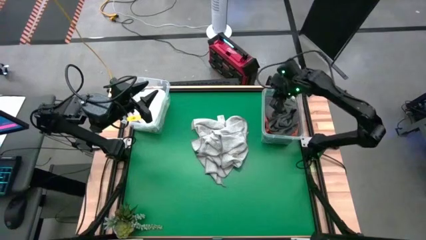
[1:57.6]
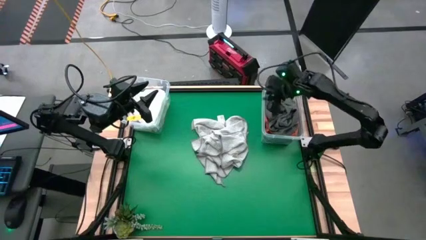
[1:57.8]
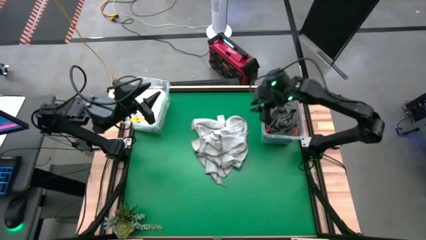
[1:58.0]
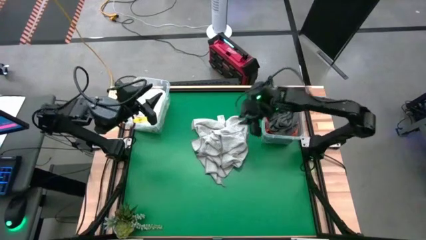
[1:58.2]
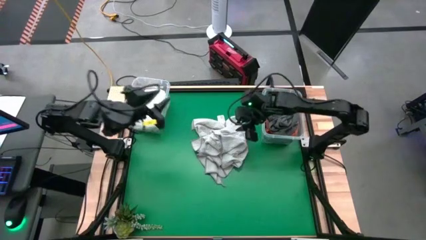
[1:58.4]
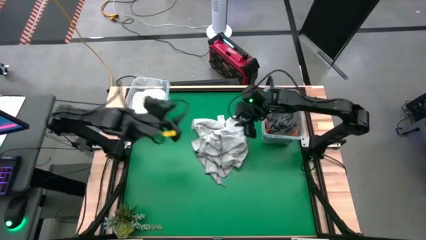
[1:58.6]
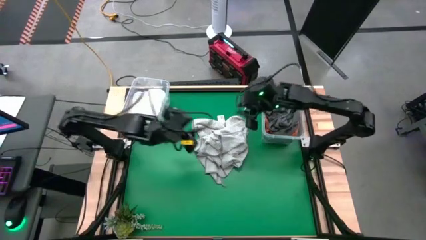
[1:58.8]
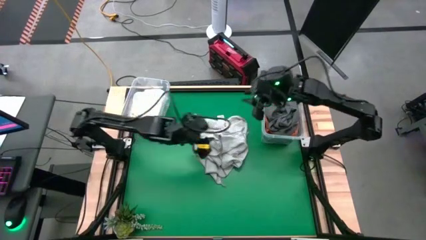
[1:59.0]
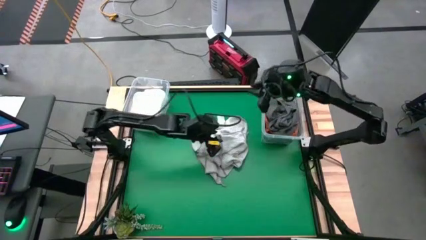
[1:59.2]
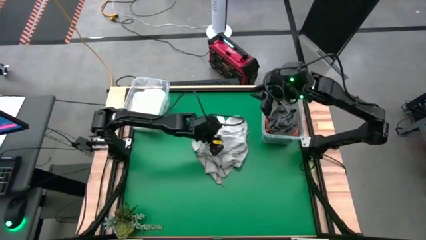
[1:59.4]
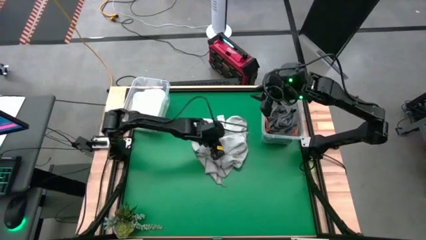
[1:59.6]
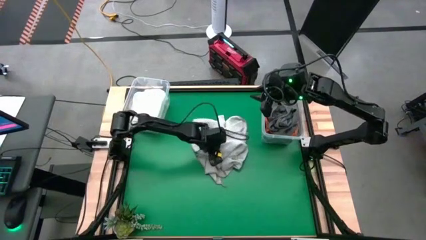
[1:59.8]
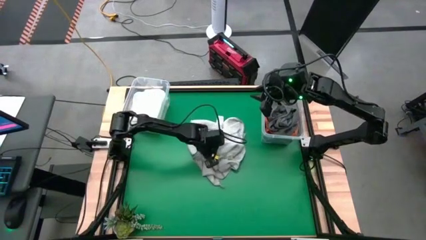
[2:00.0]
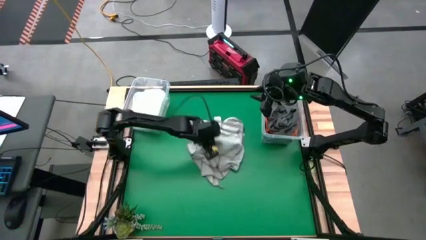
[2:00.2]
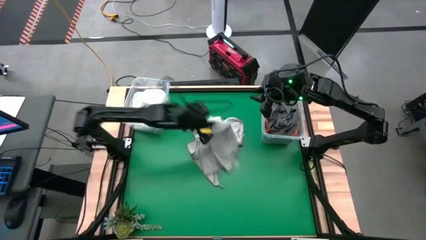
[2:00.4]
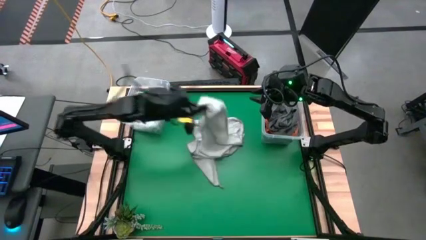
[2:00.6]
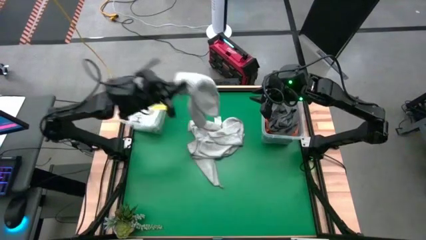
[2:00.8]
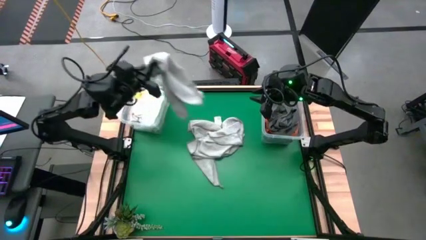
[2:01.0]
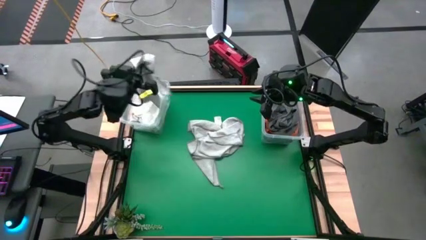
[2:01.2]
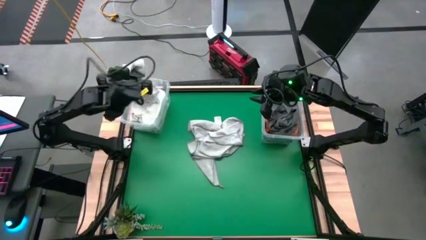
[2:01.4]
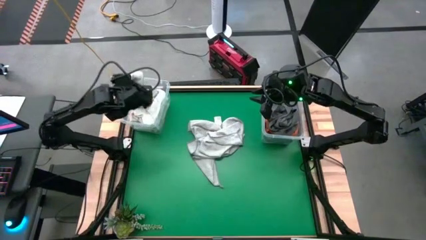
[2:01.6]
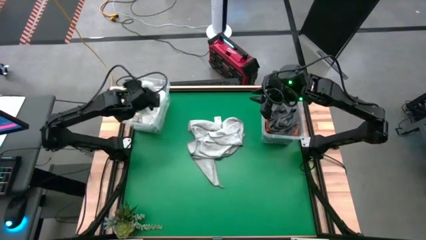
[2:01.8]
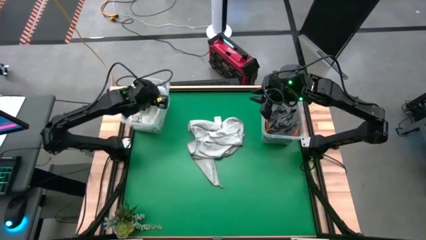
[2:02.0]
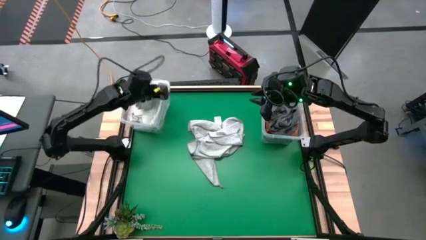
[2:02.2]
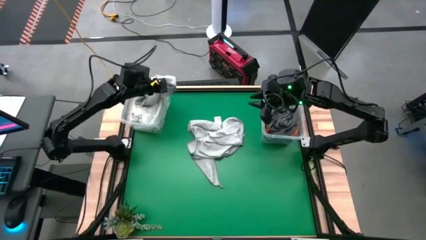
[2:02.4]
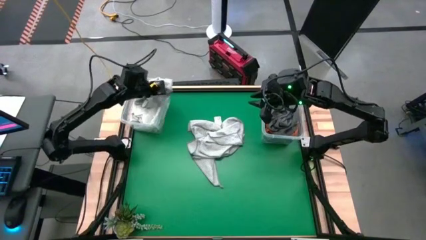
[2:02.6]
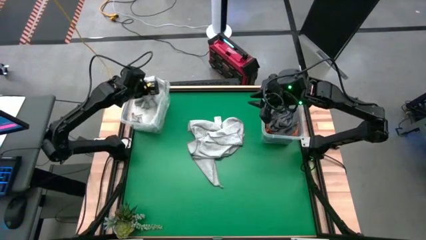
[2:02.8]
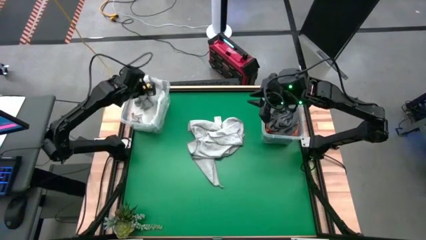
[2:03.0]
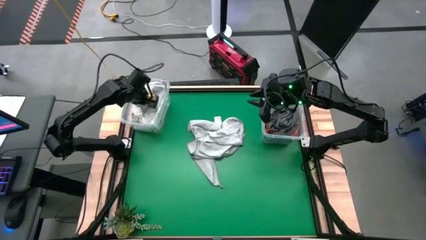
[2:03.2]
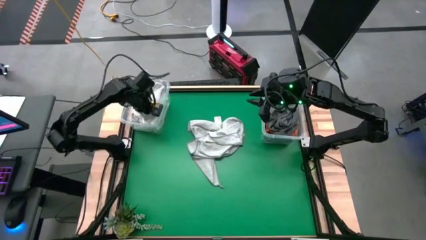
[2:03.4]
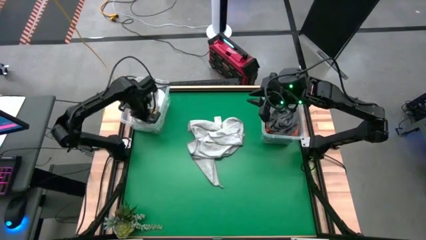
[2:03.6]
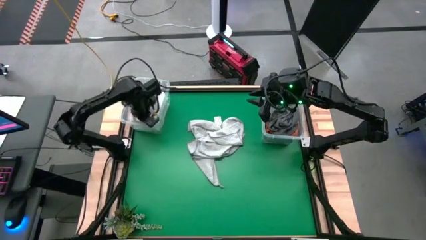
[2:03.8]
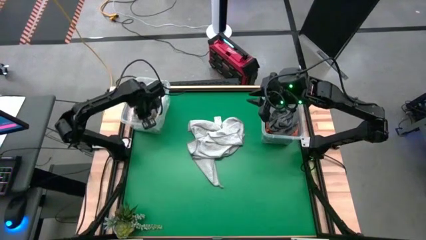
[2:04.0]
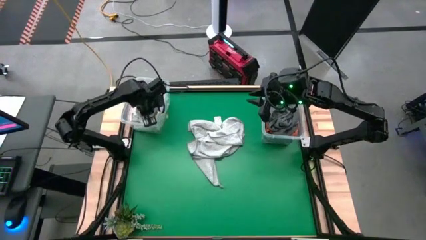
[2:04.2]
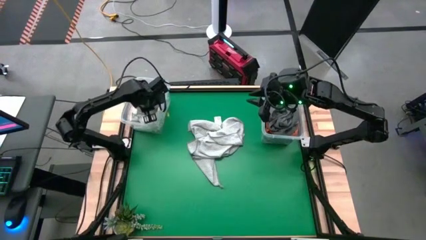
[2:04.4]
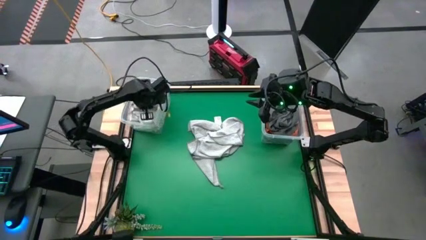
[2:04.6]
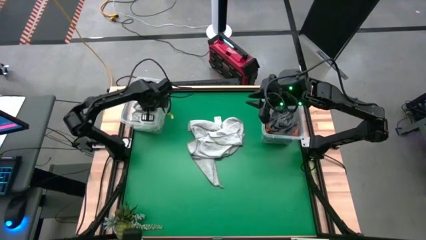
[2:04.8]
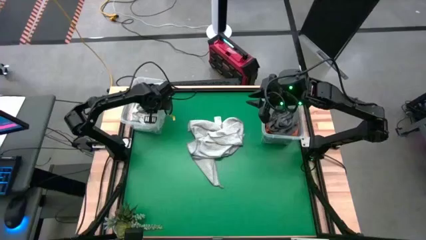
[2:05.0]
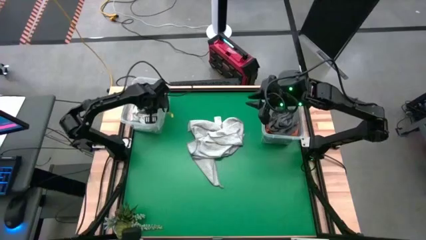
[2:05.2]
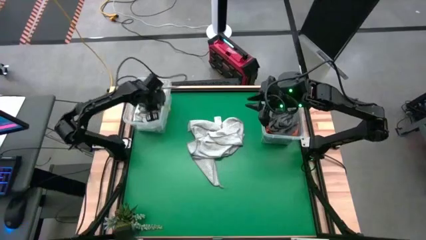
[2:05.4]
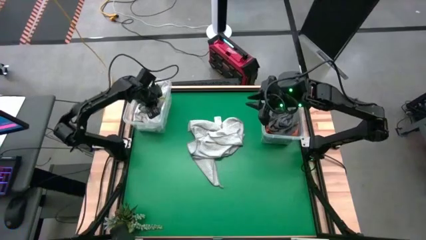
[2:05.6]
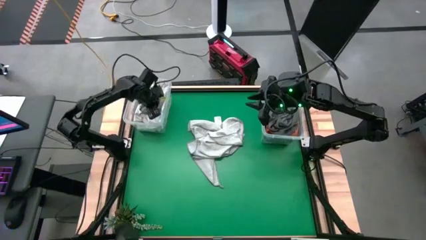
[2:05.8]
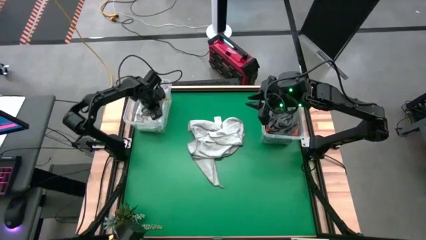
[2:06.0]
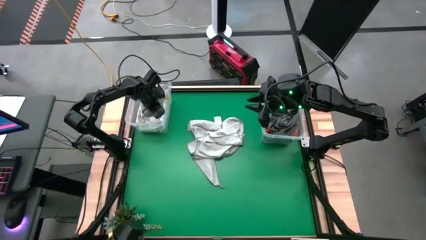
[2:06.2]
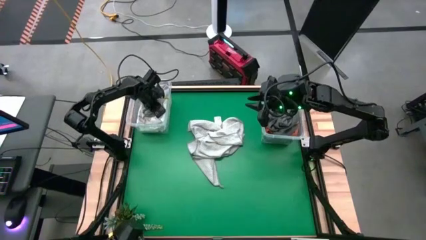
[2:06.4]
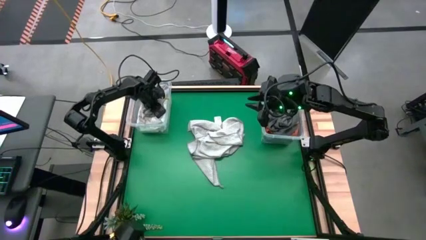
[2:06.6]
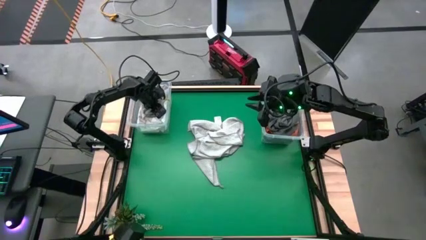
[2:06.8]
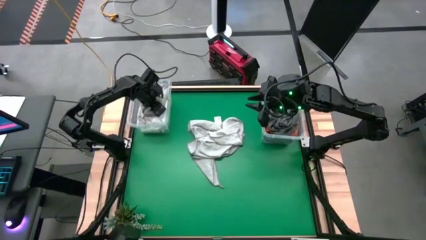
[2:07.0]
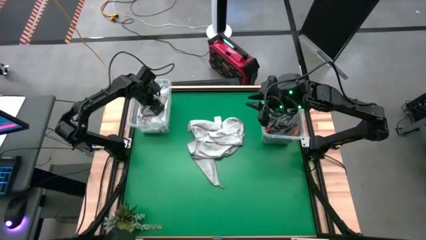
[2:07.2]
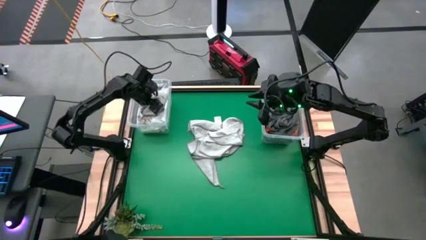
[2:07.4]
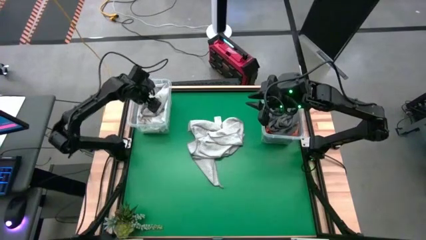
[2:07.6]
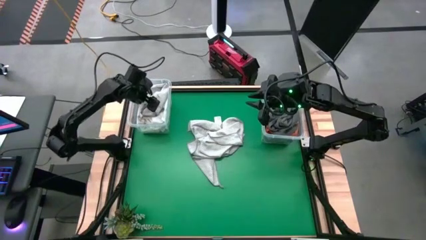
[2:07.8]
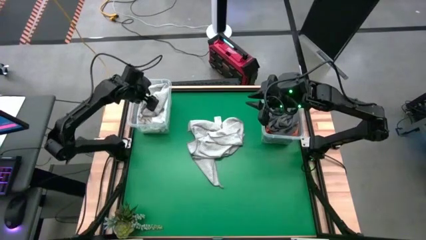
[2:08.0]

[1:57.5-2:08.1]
Task: Sort towels by color in basket
Put the light gray towel into the left transparent bin

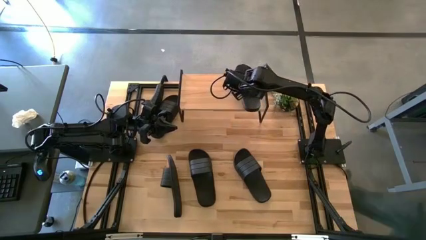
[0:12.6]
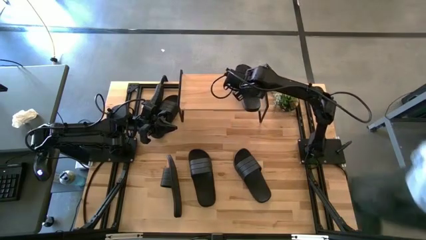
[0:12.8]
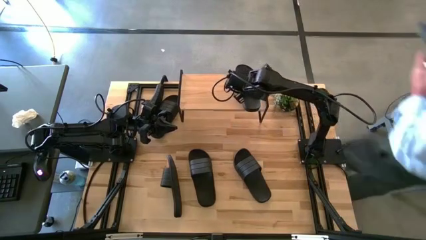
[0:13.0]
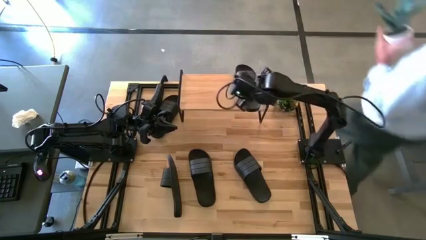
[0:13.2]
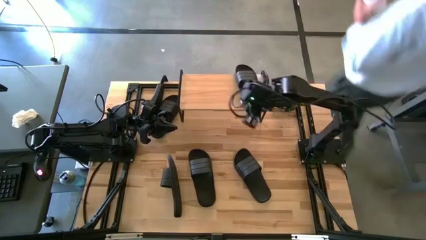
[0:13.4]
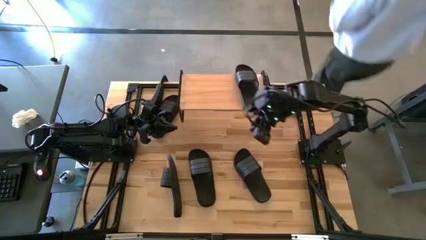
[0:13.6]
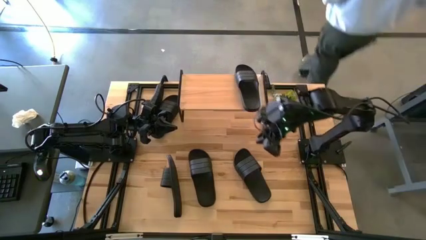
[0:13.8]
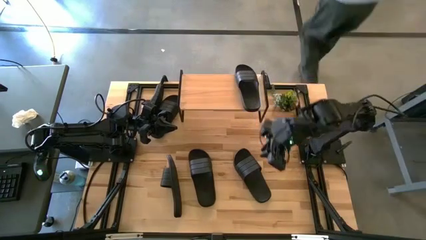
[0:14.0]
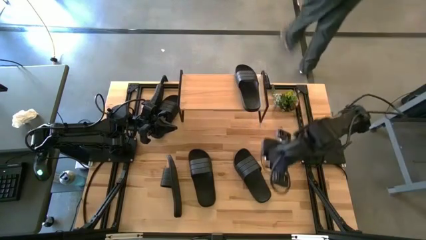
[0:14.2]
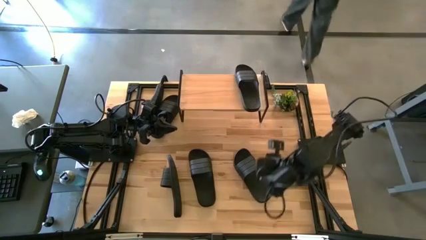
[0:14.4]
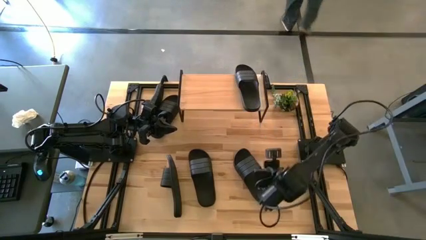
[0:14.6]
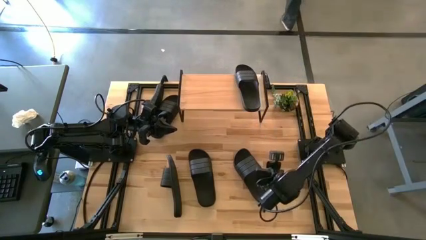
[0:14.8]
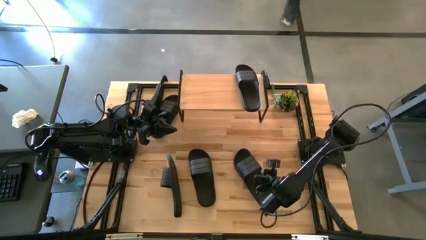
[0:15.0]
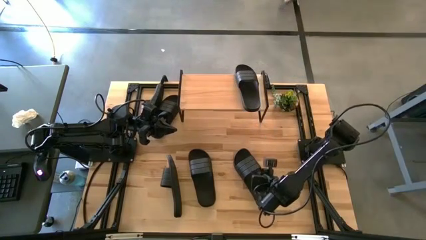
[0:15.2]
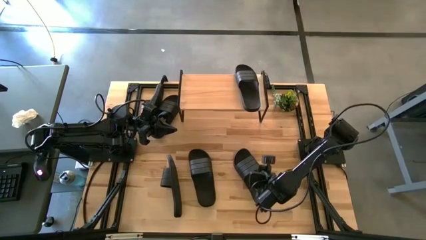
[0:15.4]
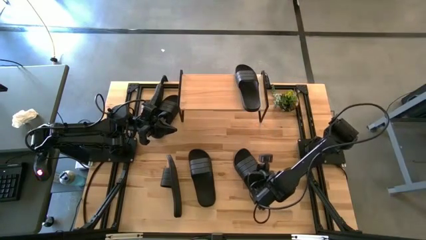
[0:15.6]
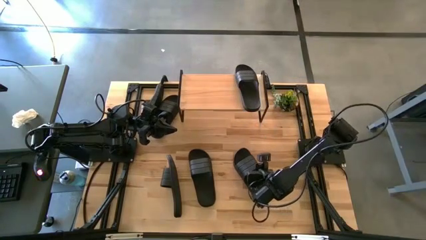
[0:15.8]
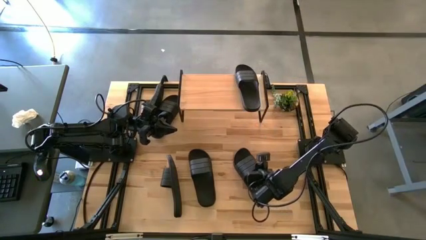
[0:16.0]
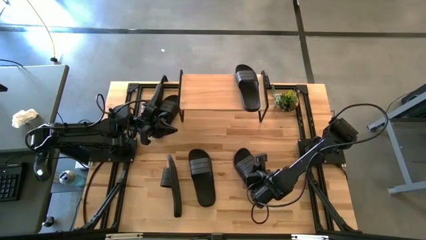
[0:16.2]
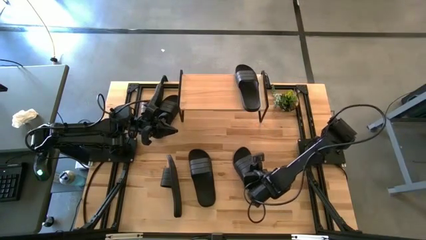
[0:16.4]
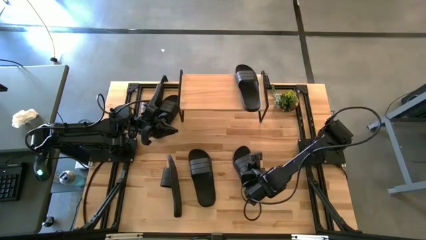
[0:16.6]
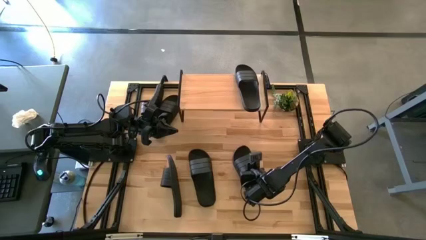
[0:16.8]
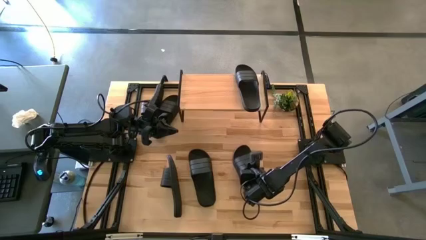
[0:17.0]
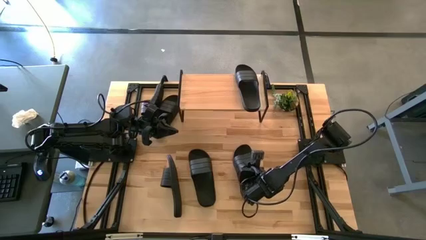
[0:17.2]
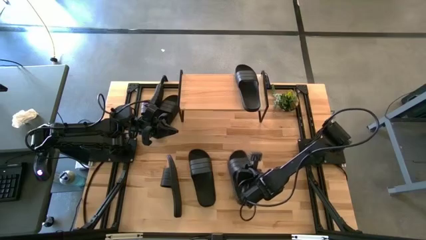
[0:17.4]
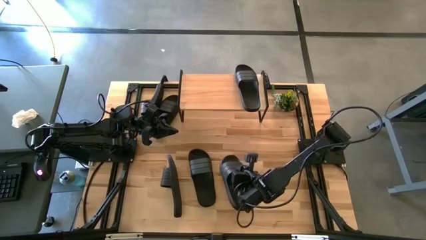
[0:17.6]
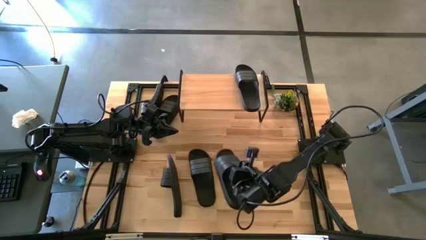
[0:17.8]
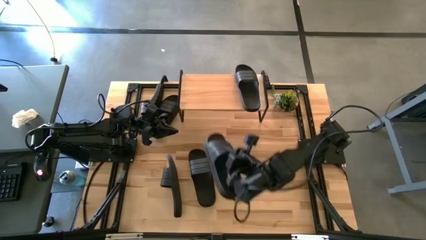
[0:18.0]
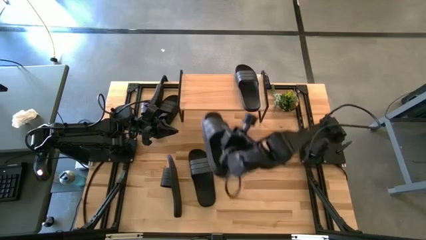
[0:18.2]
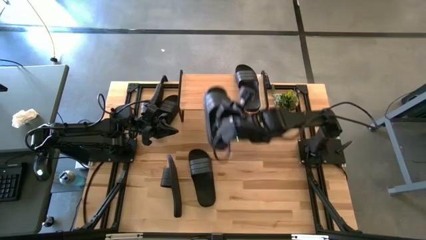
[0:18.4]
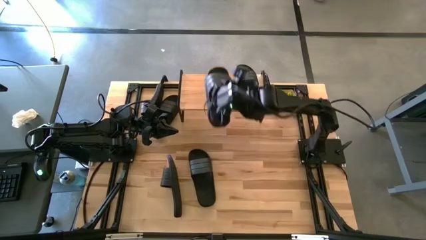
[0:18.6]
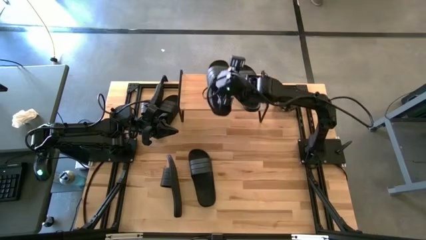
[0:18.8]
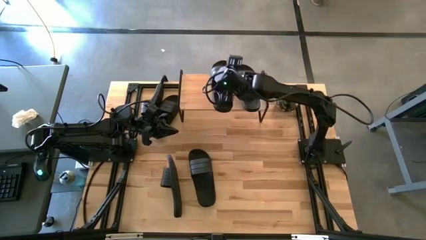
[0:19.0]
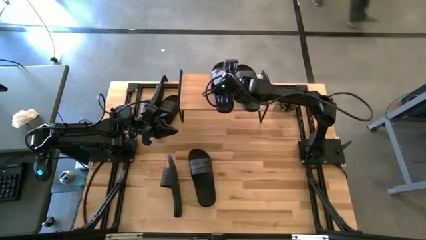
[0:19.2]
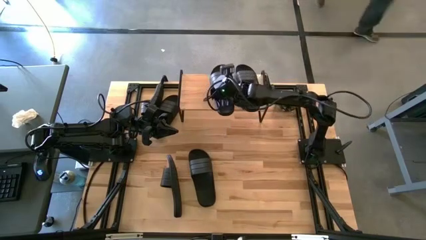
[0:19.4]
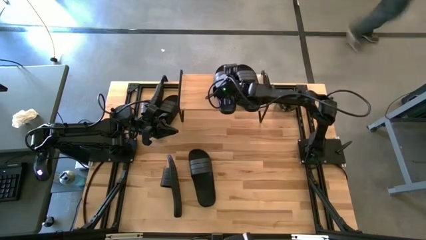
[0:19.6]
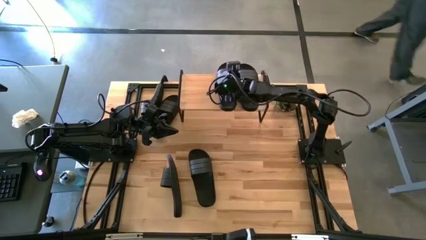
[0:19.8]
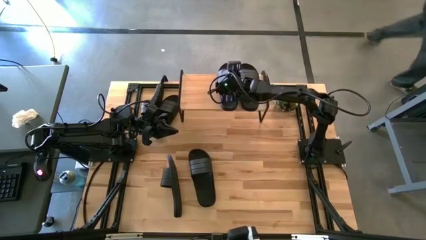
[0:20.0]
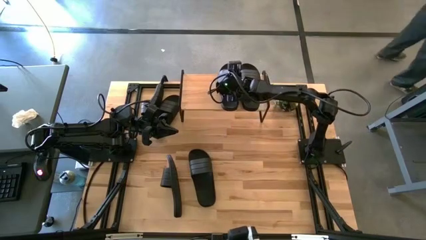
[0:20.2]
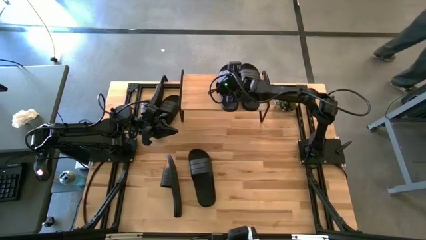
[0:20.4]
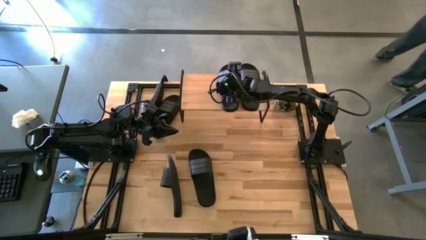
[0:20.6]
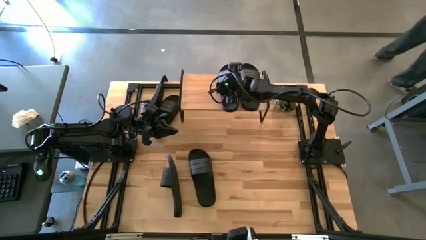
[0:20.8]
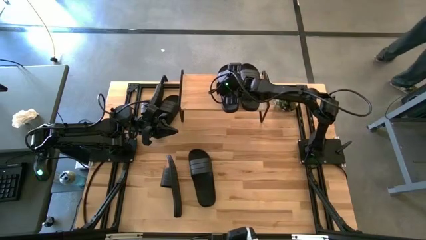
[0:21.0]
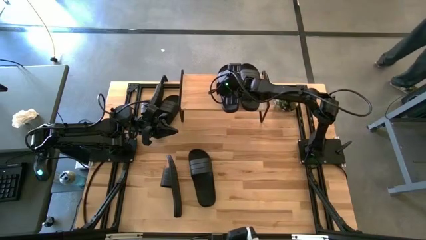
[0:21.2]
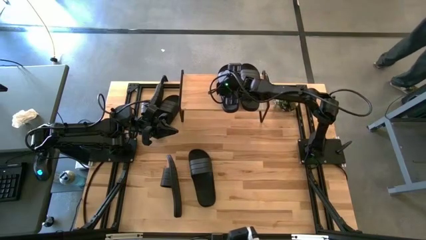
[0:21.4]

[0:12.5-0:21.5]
Task: Pick and place slides into the shelf
Put the black slipper on the shelf
